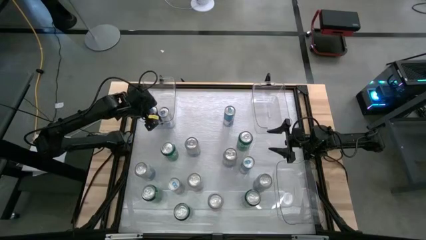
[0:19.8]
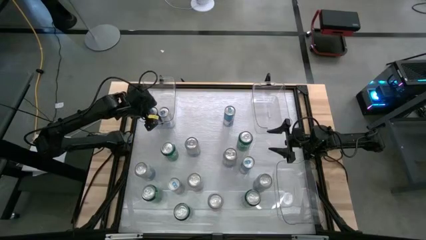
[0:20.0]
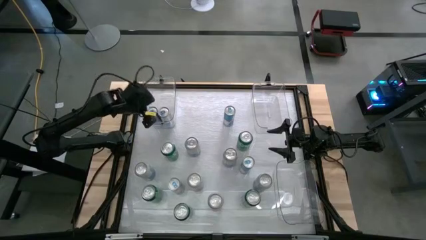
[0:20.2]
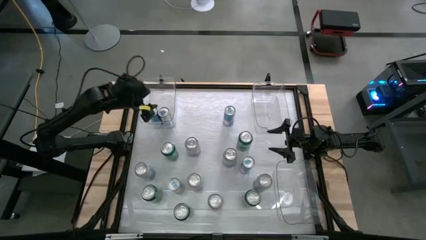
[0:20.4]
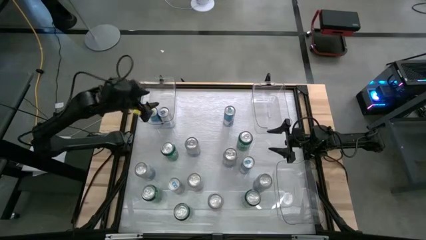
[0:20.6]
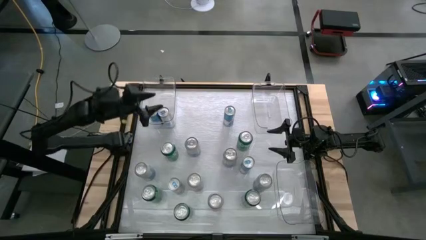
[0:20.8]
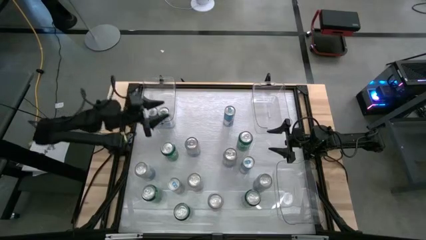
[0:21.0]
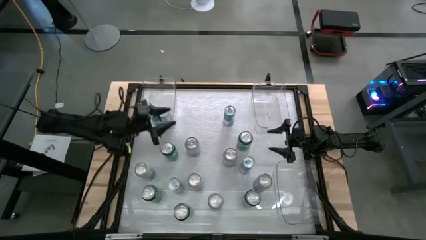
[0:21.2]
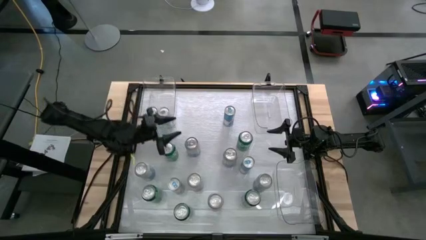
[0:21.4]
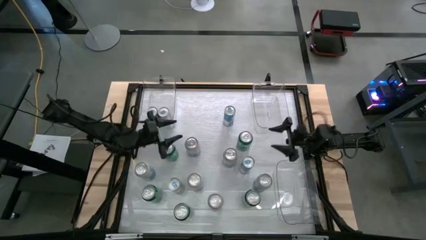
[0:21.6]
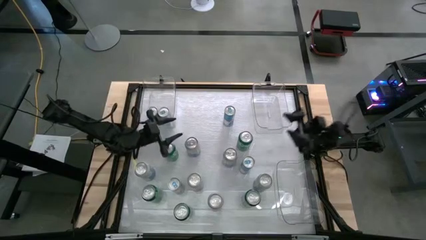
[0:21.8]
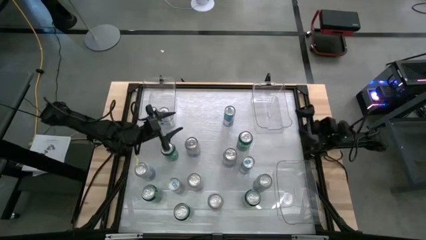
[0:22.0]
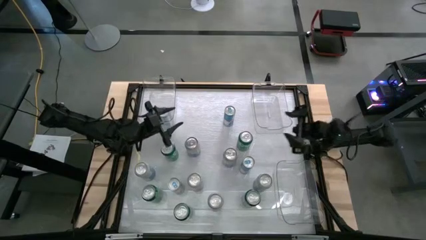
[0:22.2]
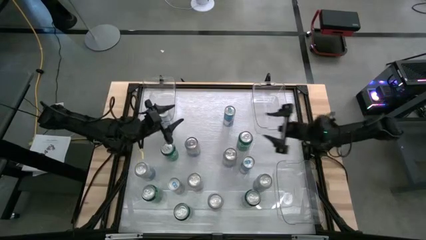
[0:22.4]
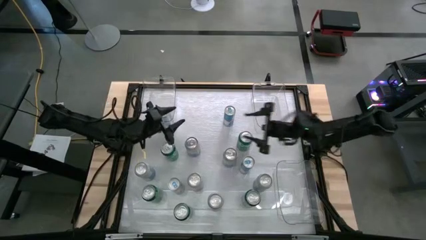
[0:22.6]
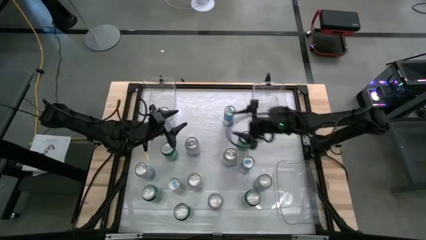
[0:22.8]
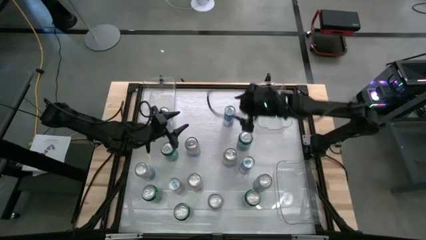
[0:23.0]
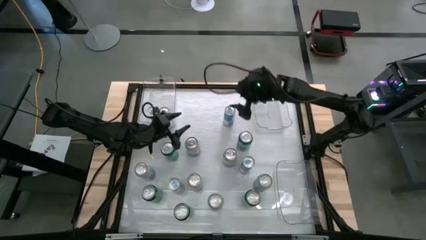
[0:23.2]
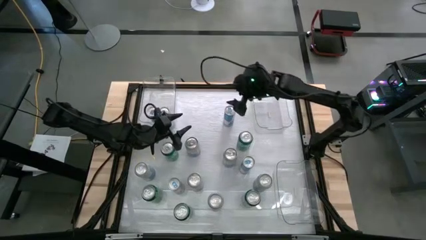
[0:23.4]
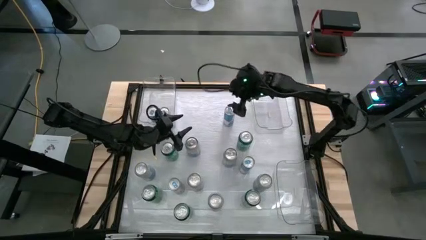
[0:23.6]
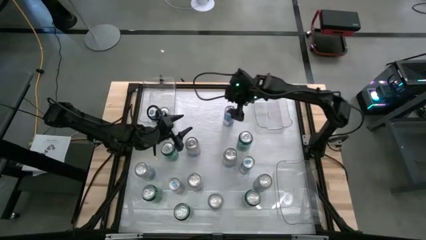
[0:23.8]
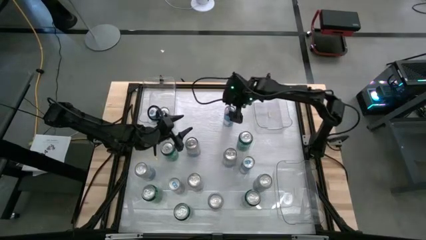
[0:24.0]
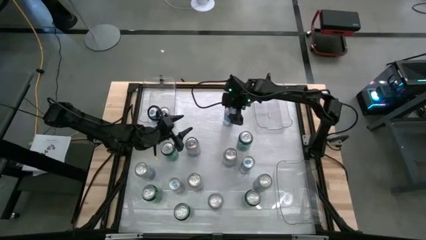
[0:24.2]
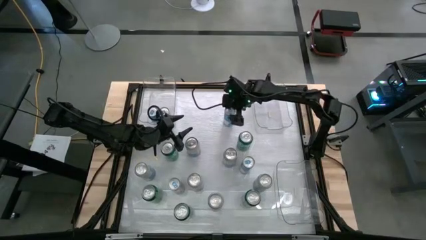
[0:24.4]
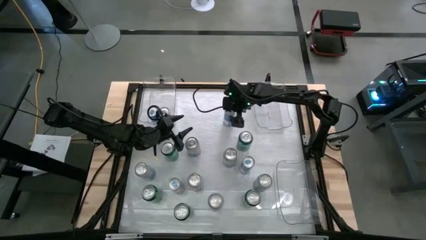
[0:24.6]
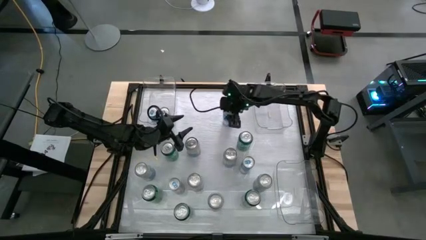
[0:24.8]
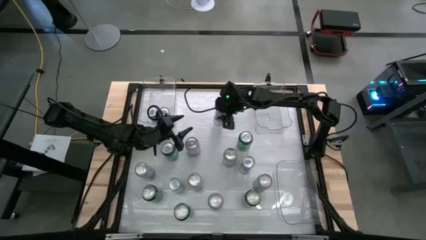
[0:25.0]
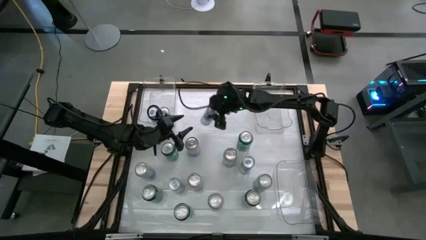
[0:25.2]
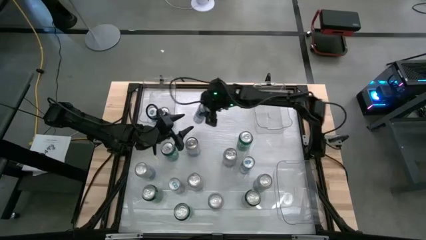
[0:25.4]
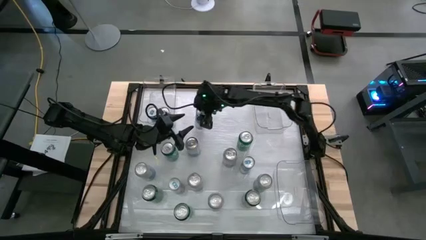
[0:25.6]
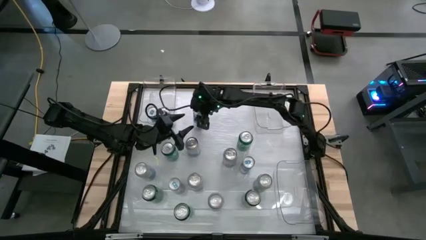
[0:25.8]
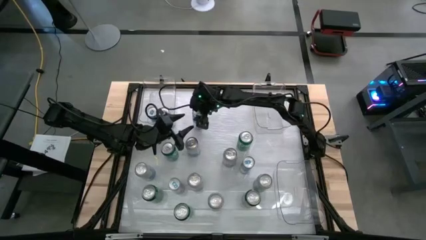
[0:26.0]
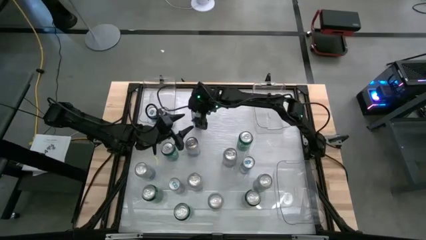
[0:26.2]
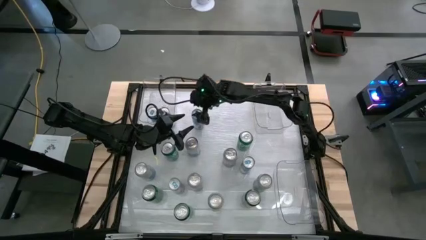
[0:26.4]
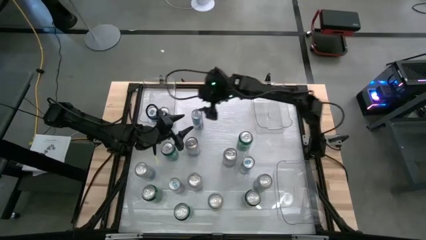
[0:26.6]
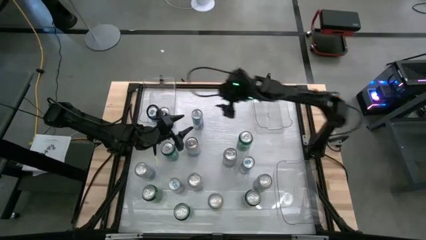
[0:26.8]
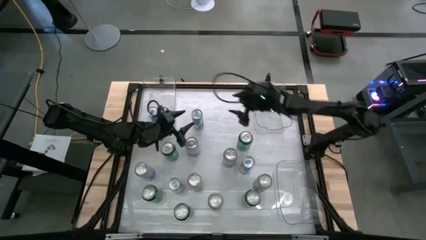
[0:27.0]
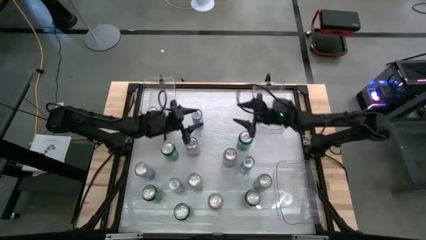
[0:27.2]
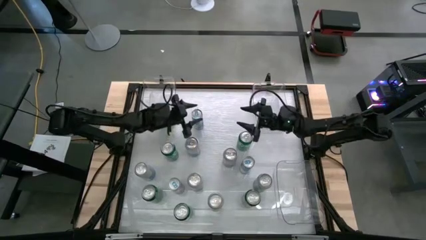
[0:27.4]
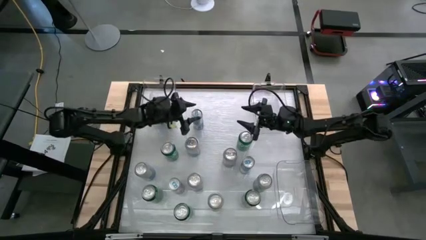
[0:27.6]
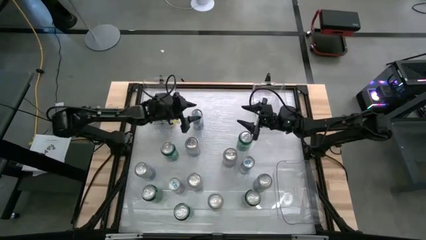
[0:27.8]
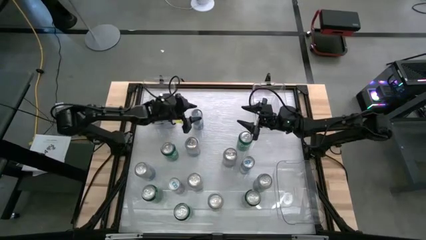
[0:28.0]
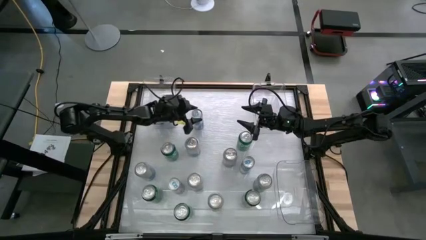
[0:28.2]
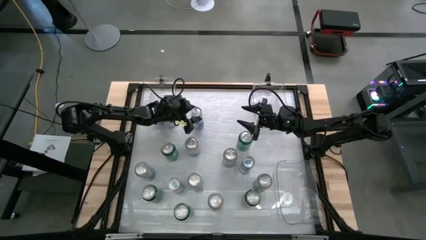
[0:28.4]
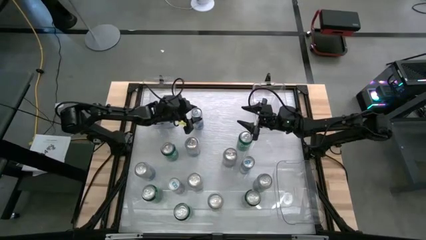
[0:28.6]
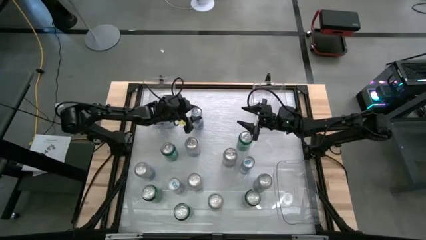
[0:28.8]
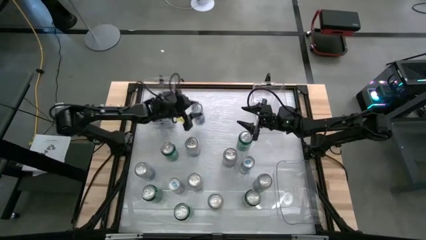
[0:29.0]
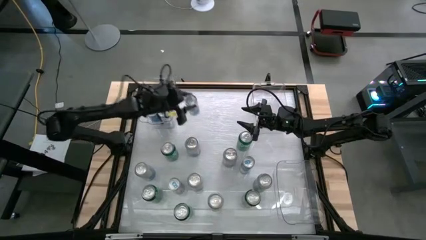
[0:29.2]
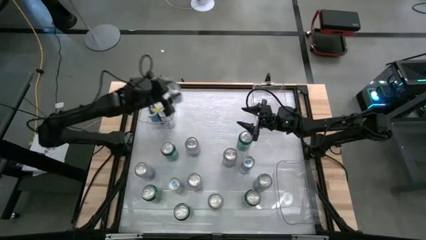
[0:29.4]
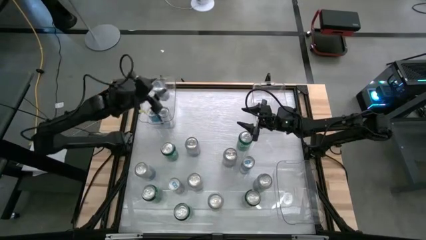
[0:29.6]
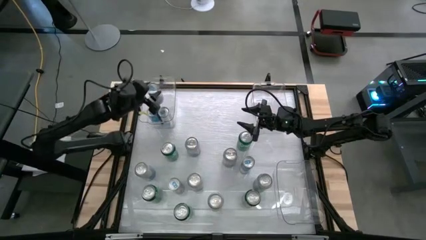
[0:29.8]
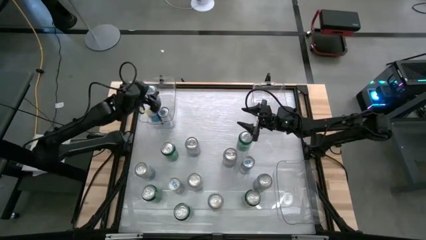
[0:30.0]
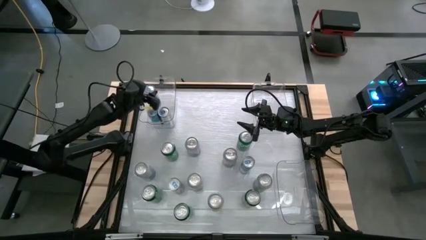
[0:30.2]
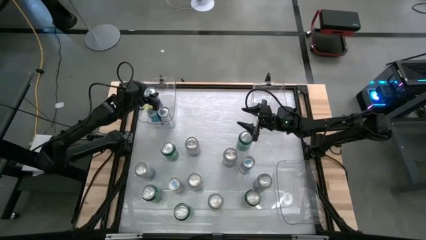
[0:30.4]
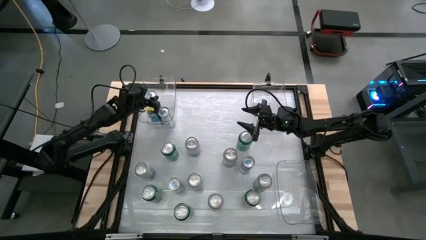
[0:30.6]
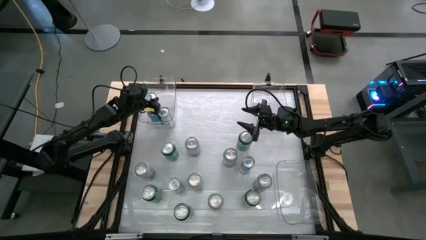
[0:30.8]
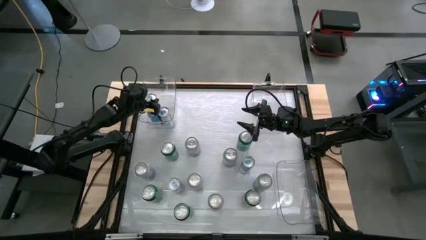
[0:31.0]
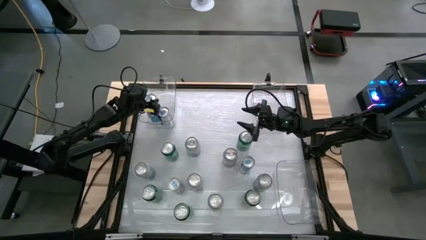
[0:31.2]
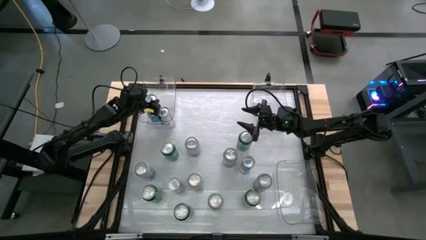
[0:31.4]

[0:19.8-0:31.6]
Task: Sort soda cans
Put the blue soda can into the top left transparent bin
